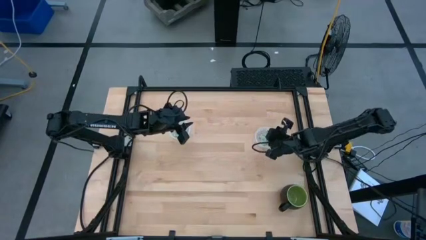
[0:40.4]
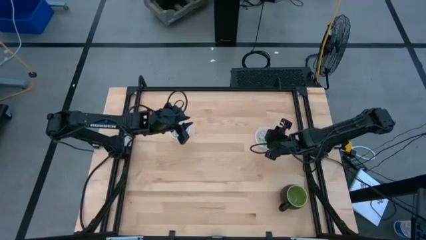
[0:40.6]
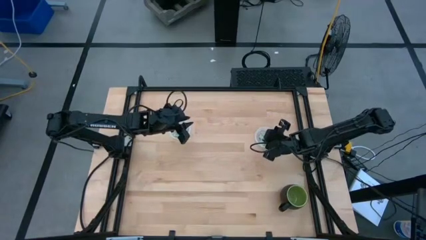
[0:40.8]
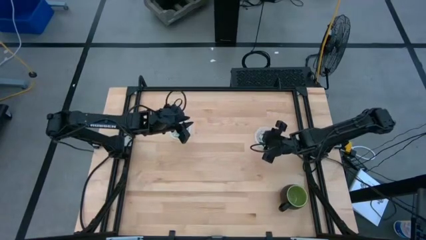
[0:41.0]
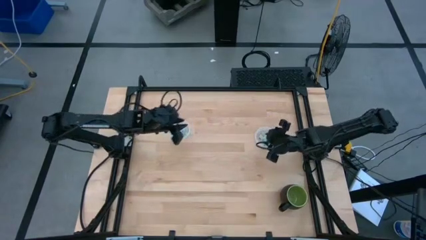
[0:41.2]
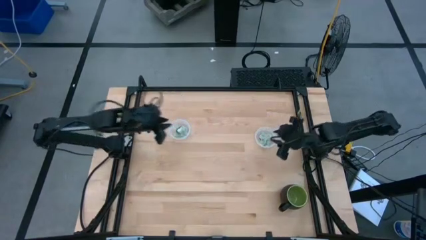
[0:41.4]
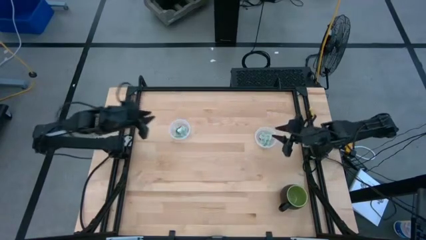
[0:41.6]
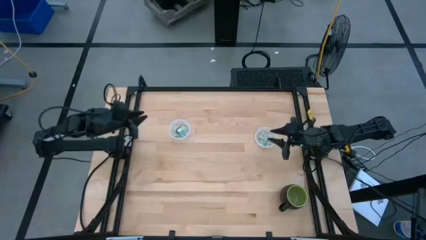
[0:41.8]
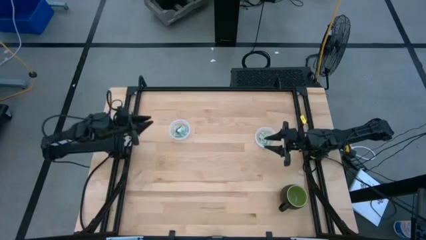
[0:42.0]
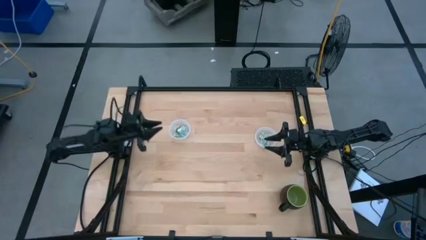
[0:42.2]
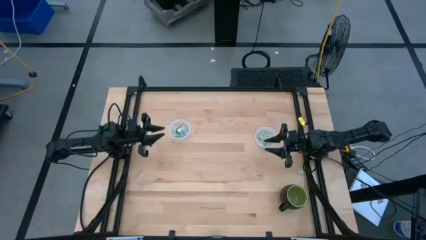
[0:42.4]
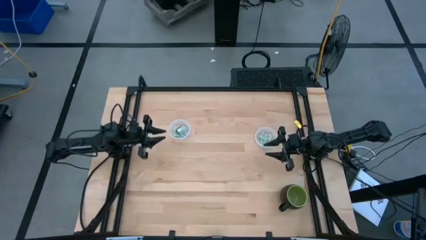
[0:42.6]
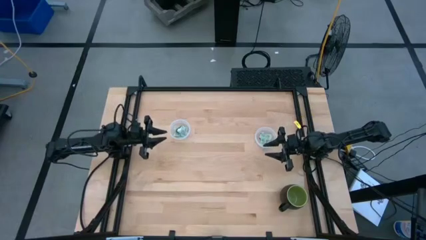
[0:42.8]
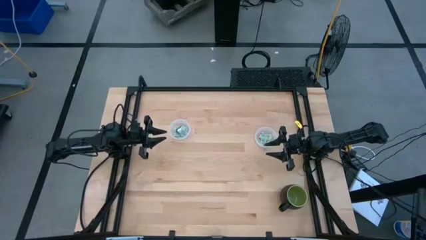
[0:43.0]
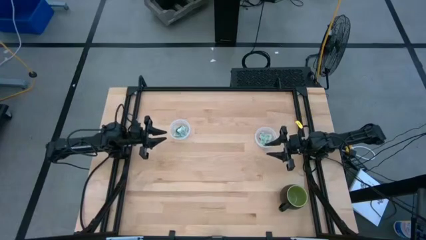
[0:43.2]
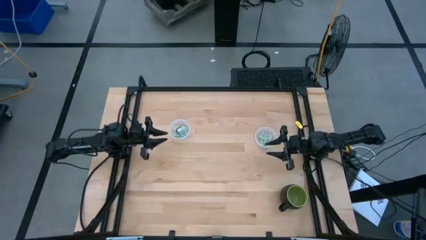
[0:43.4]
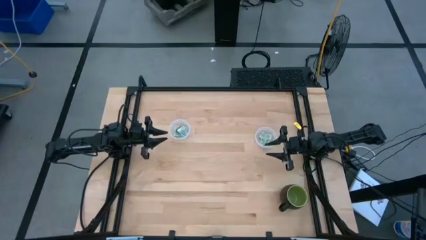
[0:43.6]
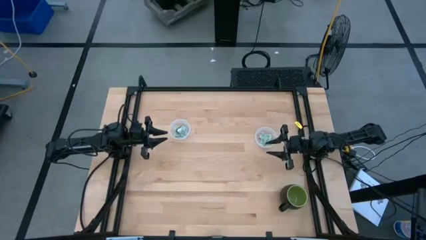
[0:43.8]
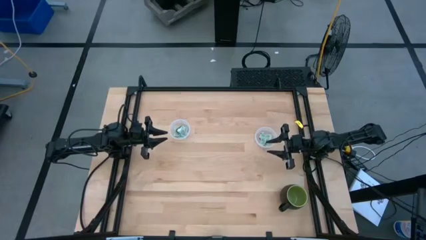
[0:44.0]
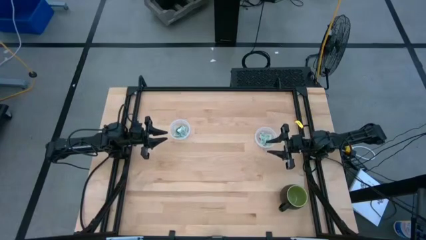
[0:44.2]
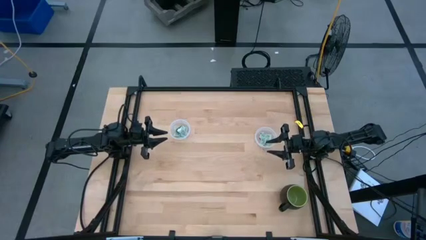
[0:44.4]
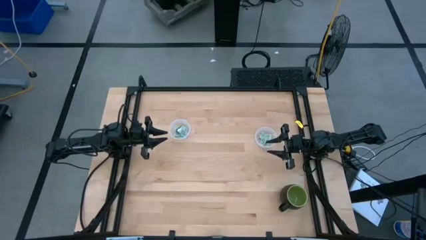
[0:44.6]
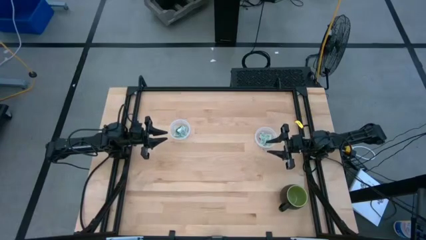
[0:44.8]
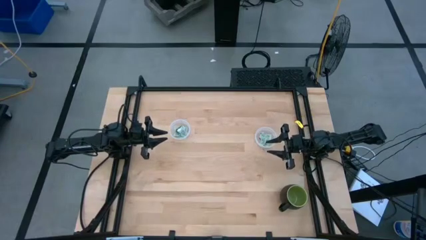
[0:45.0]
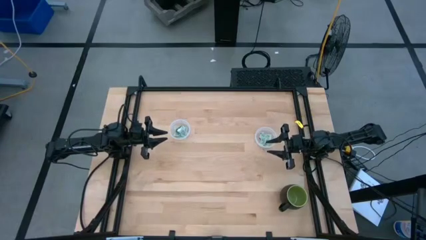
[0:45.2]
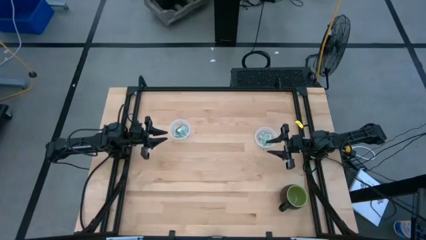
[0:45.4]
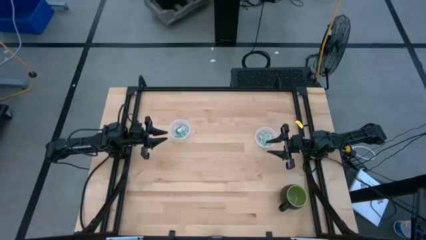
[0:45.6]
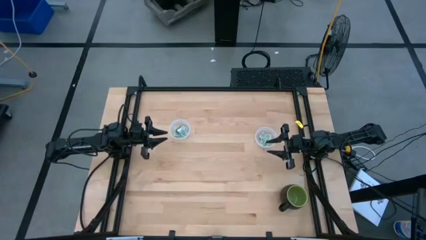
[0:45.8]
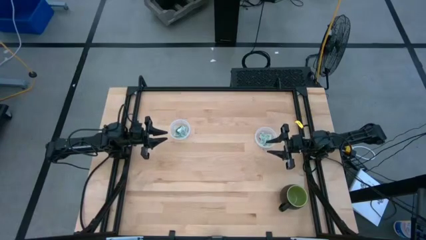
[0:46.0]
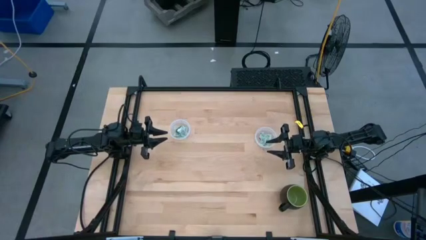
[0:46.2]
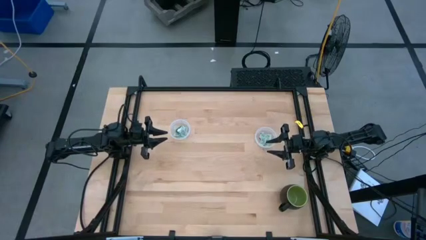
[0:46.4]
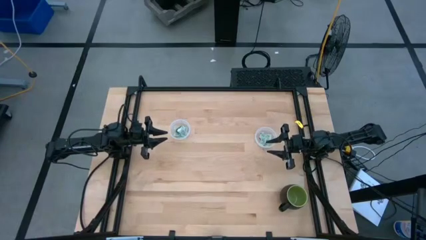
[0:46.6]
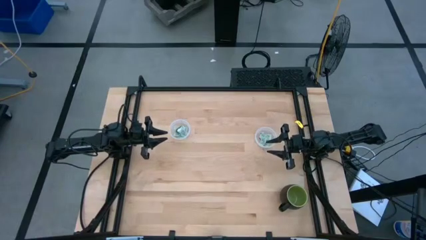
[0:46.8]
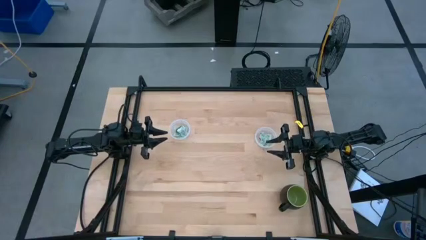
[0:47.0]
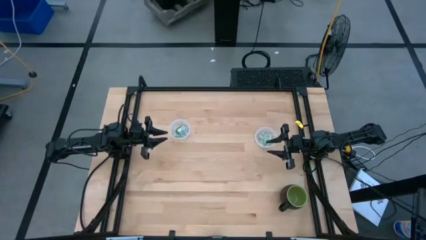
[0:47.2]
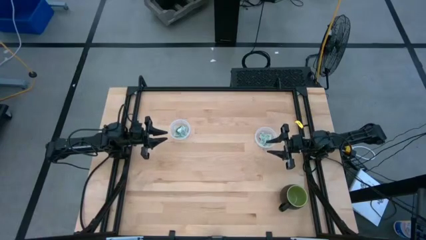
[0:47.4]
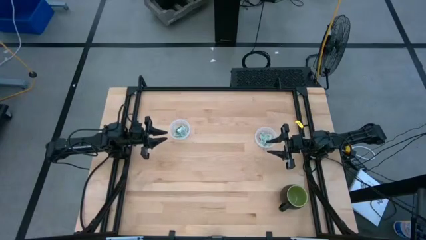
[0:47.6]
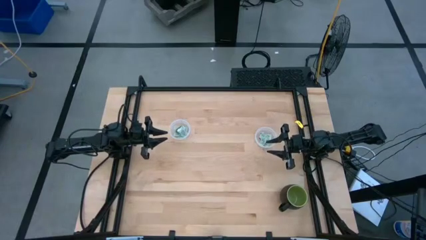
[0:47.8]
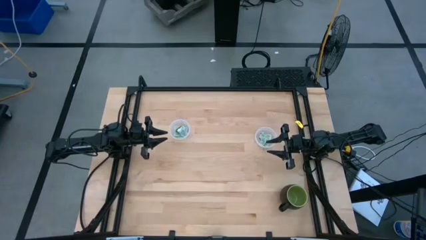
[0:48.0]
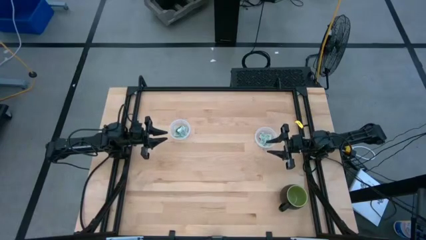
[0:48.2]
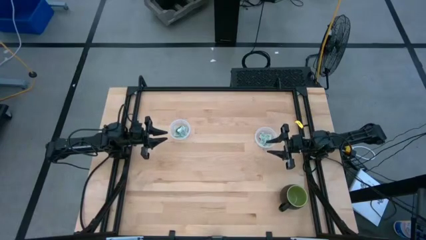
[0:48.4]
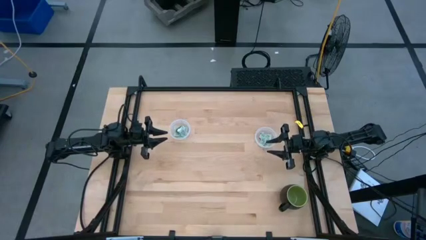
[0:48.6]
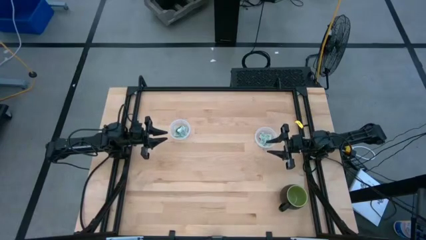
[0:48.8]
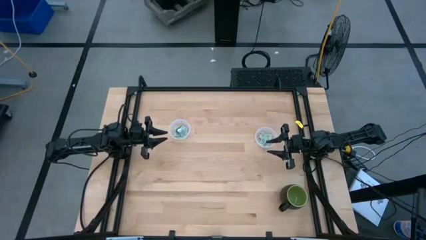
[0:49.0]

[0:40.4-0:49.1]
Task: Pick and place Stevia / Truvia into bins
Return to Home Position

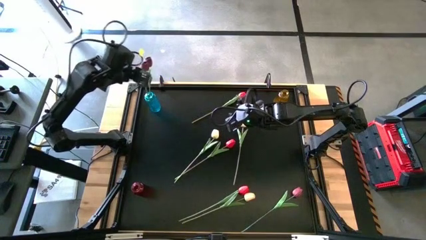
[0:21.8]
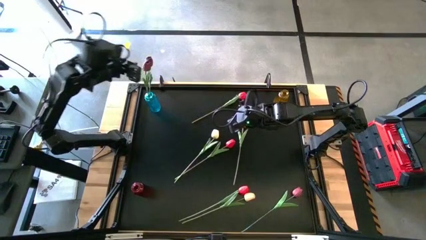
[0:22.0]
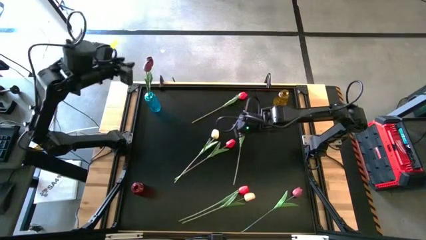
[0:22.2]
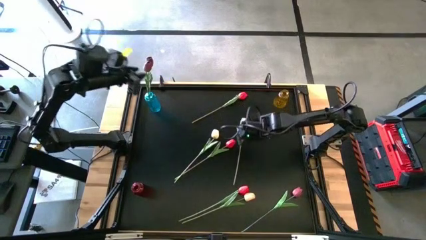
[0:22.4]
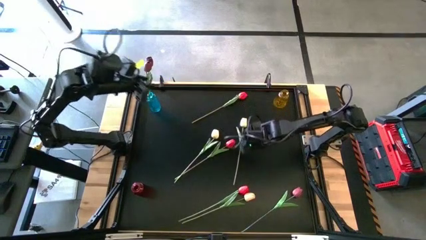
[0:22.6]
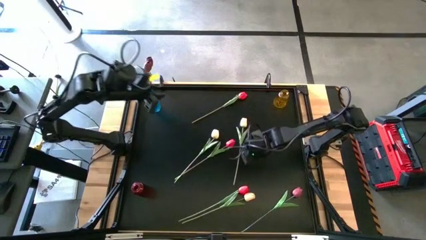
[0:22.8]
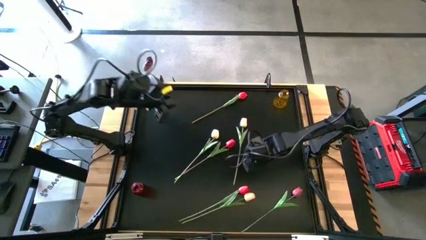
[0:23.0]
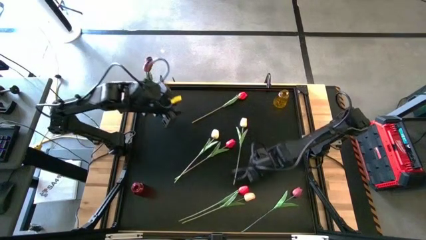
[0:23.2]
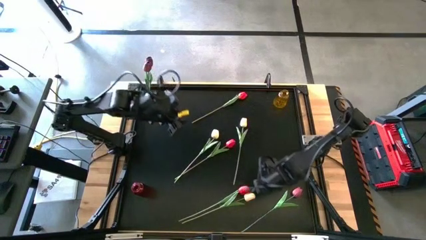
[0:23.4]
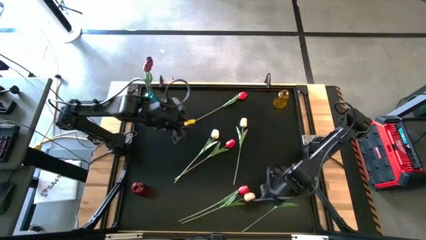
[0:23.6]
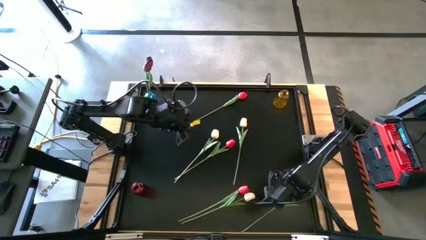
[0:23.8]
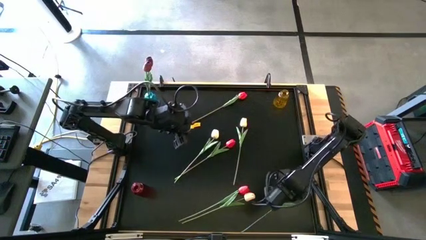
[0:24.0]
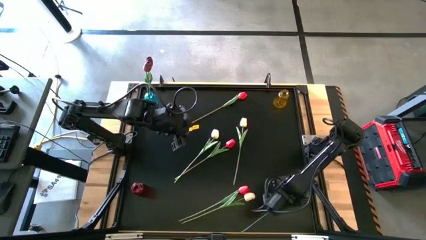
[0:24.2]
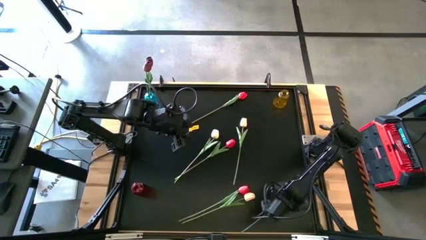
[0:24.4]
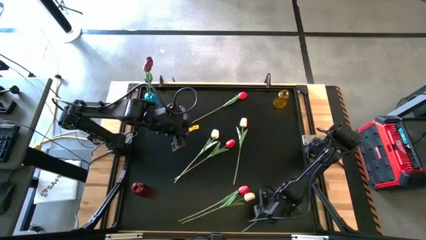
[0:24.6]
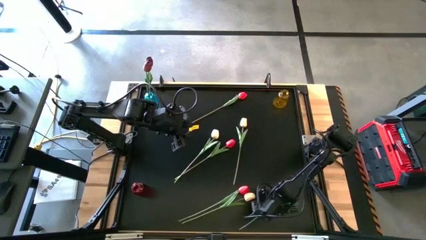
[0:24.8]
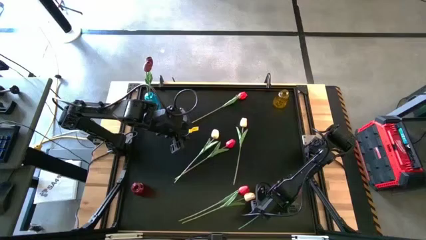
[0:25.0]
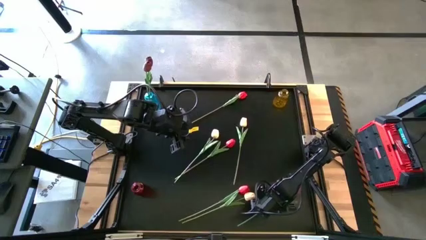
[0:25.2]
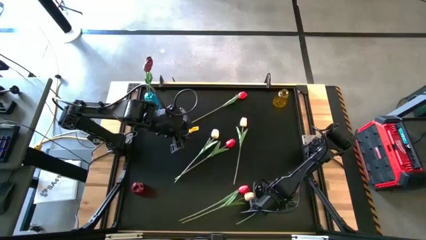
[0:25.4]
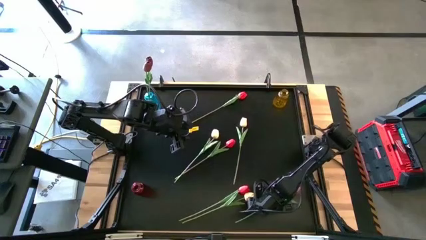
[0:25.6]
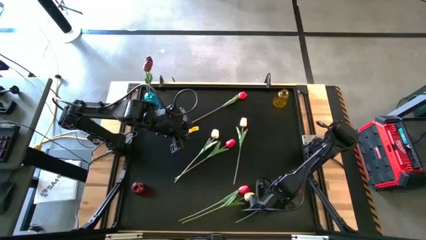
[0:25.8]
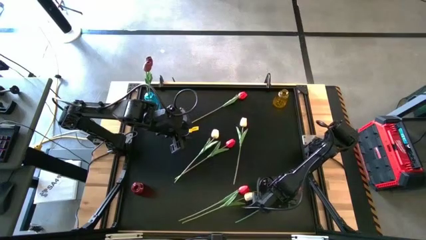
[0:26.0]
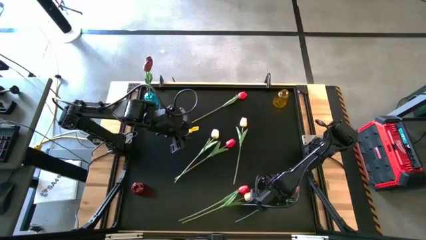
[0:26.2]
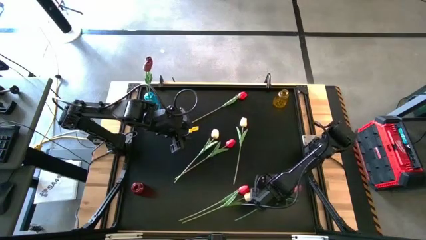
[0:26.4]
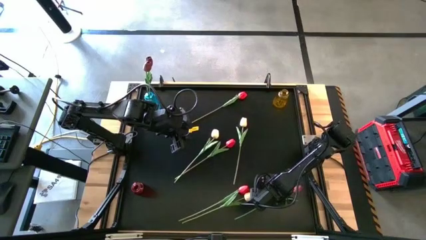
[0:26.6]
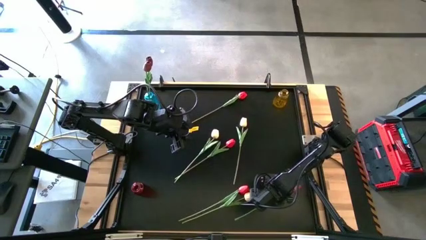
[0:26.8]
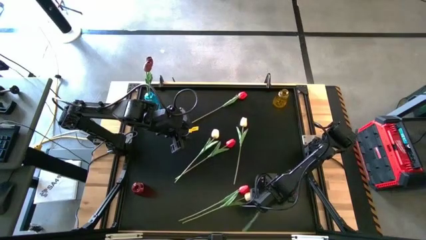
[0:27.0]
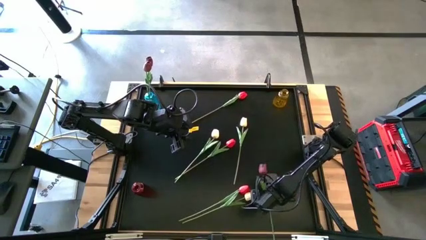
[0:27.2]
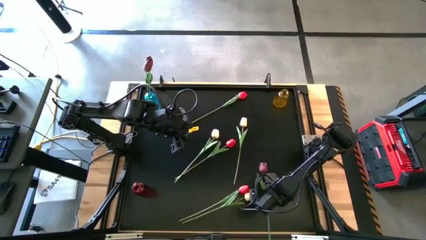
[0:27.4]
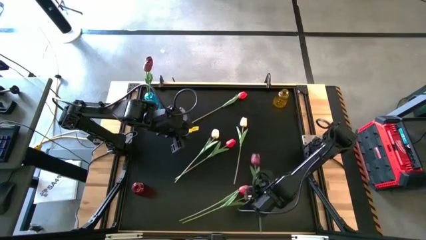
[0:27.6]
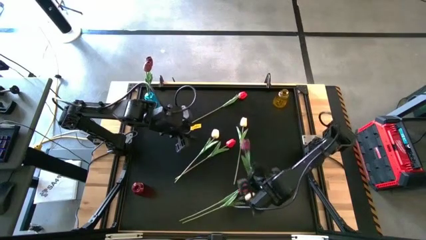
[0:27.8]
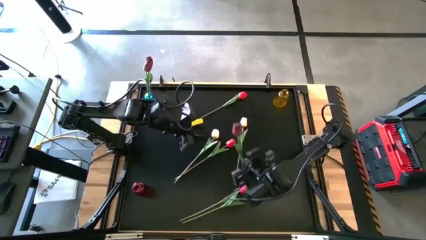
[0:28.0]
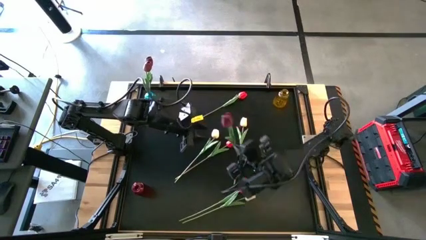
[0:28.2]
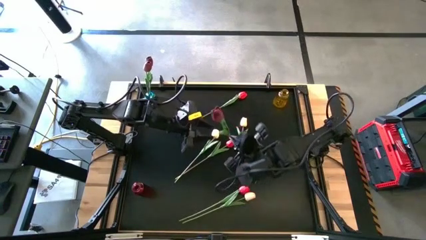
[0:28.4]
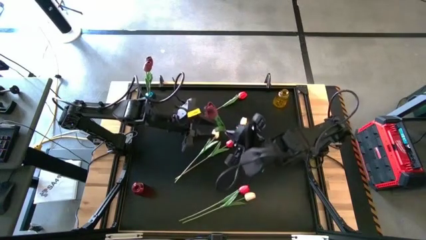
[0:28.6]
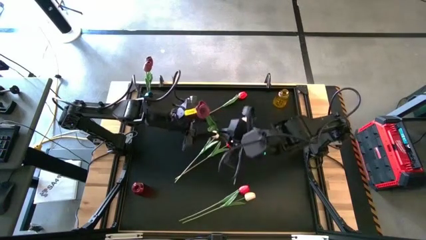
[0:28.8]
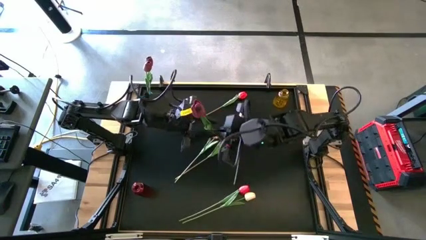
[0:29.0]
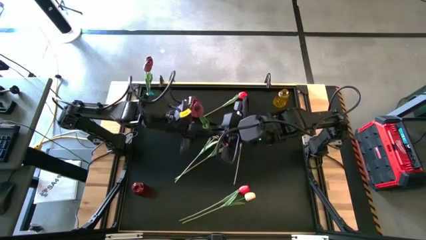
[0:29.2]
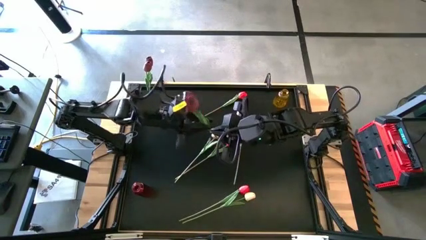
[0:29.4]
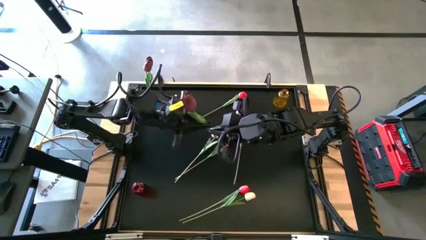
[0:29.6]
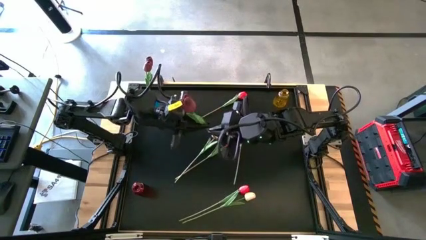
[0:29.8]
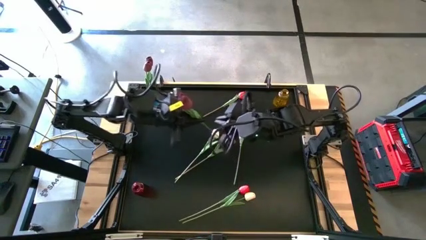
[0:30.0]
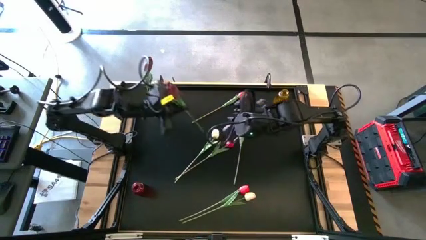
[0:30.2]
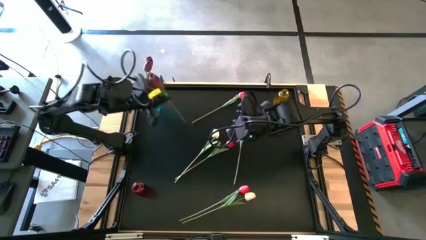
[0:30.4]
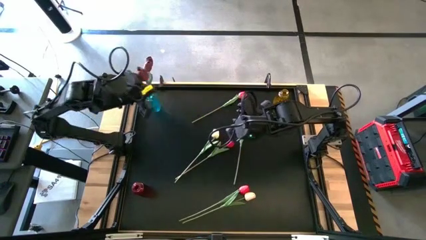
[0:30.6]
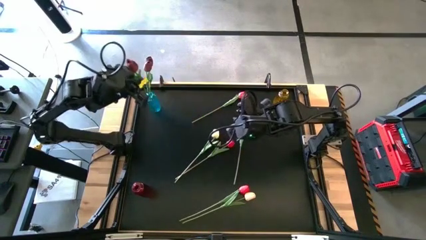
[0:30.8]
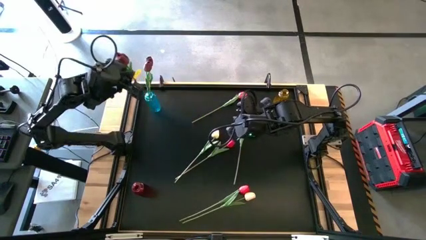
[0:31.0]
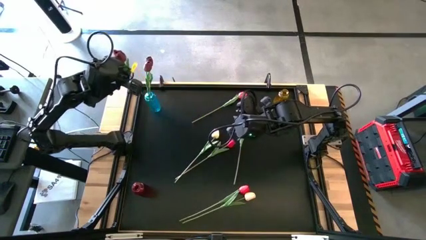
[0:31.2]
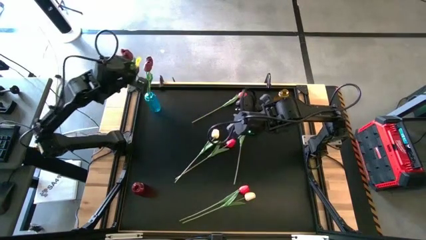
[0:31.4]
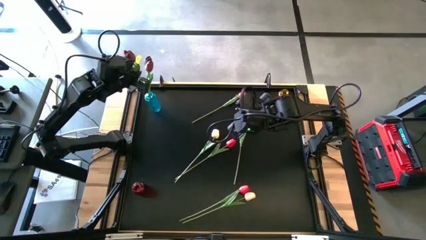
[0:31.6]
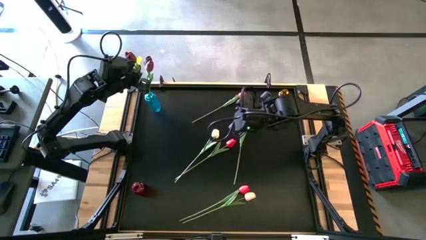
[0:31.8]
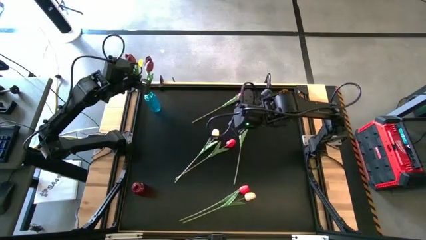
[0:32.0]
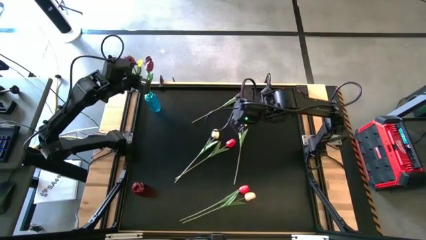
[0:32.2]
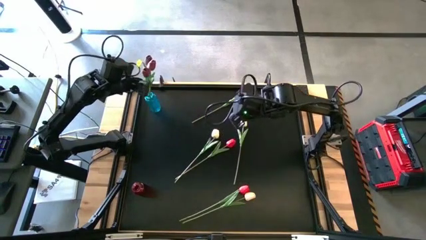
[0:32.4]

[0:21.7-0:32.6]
Task: Sort flowers into vase by color
Put the dark red flower into the blue vase
